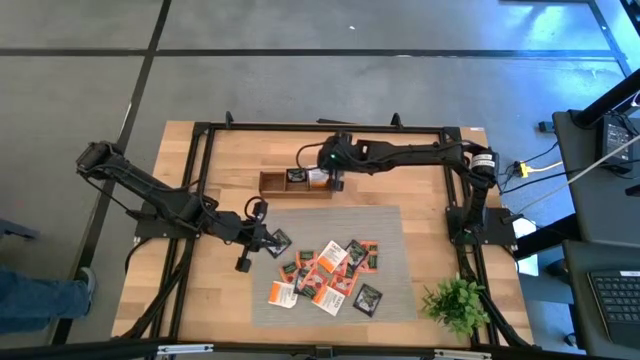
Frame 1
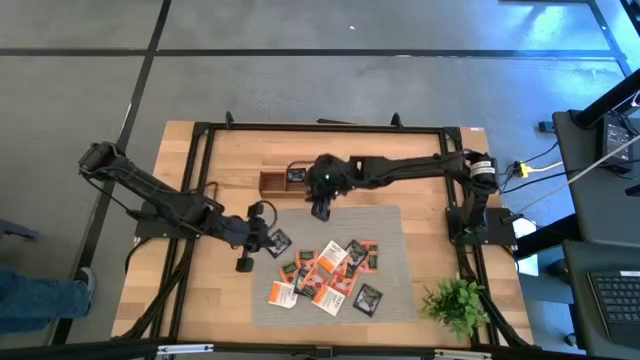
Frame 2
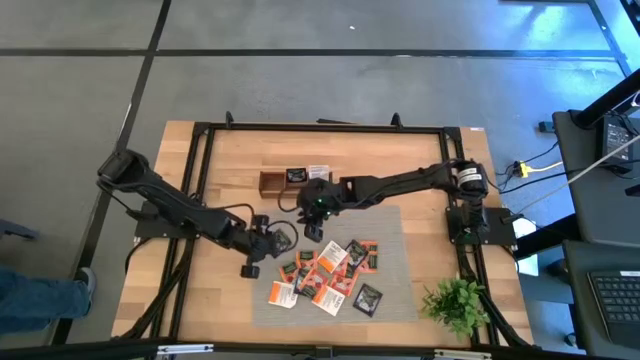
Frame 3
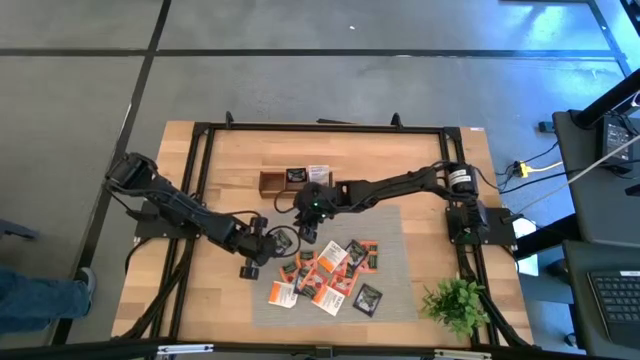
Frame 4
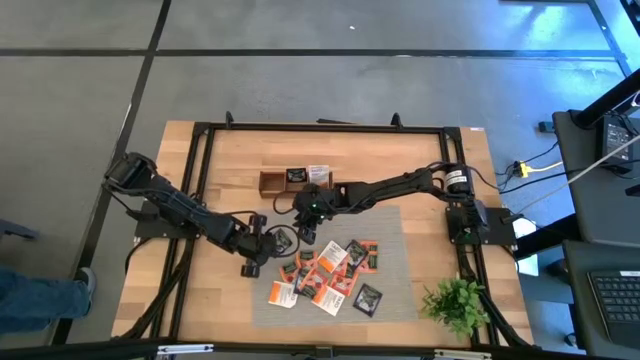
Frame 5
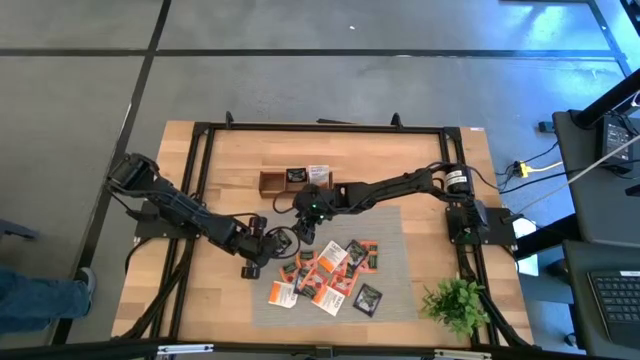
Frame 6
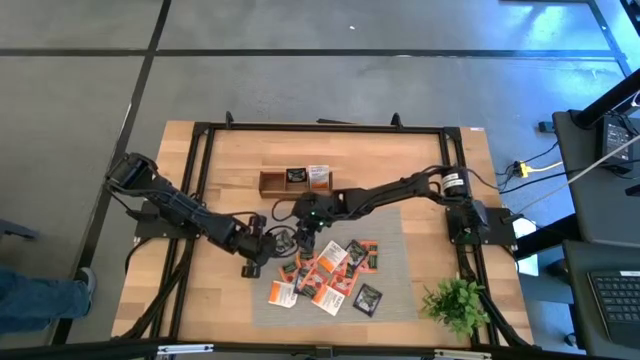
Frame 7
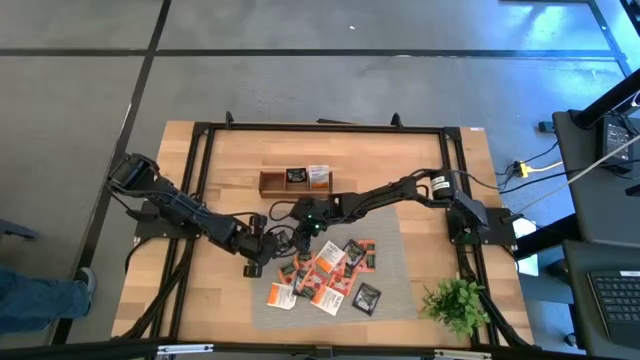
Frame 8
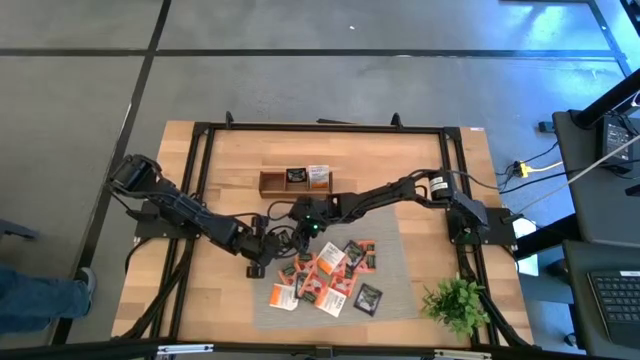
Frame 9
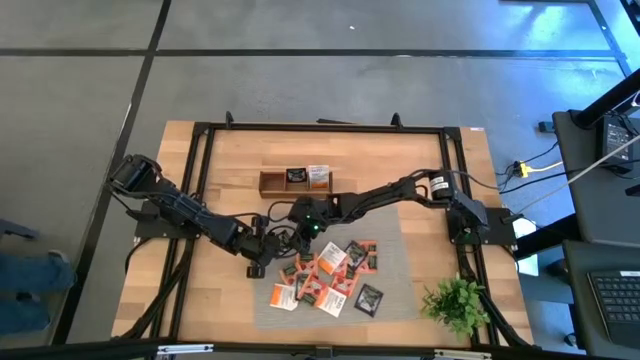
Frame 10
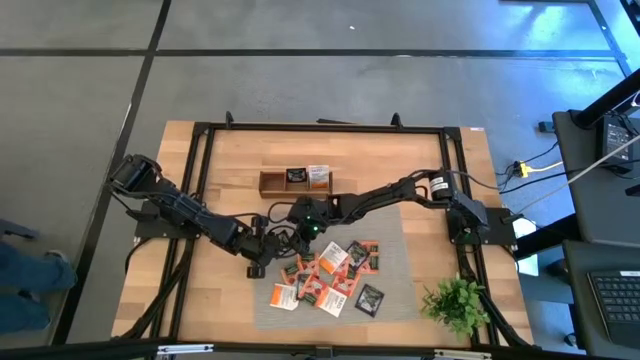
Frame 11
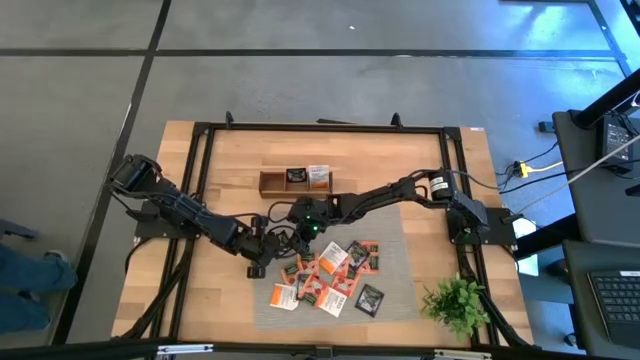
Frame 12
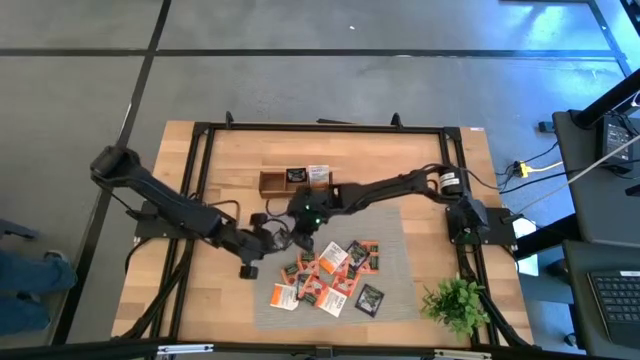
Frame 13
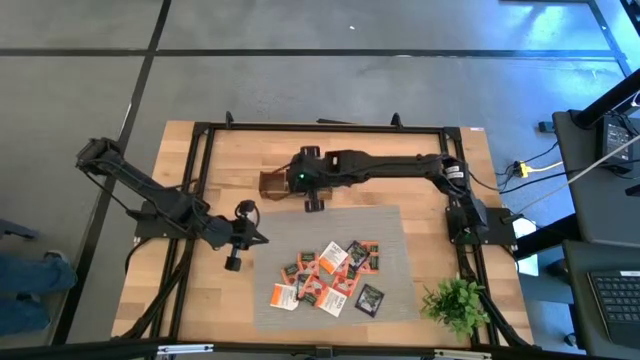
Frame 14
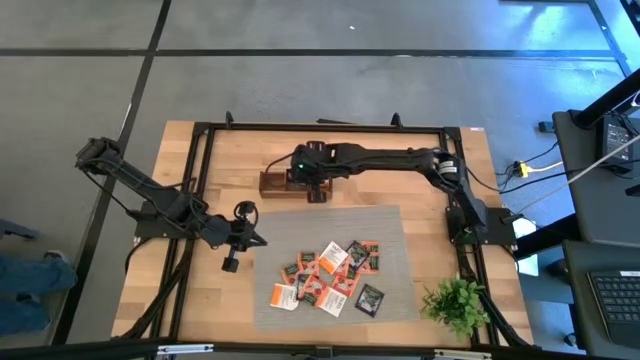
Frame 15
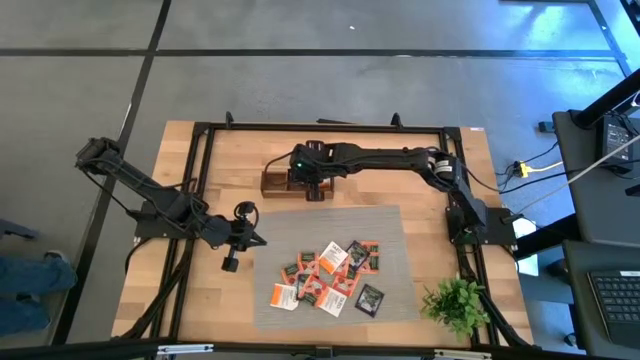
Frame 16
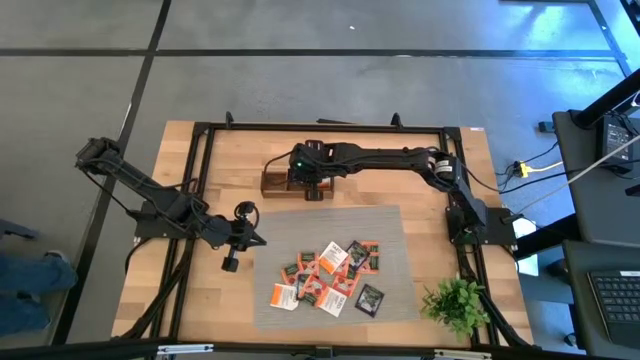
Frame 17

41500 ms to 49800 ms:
Task: Pick & Place Tea
Put the purple tea bag into the middle section of the wooden organizer

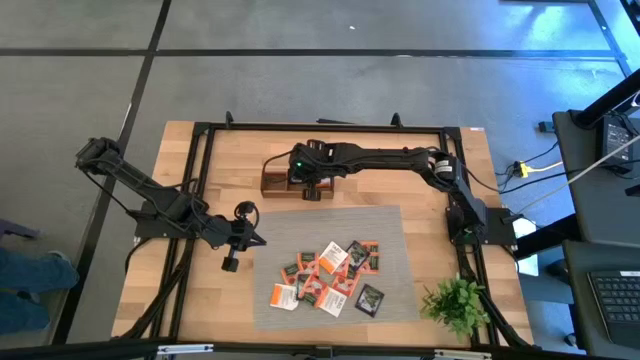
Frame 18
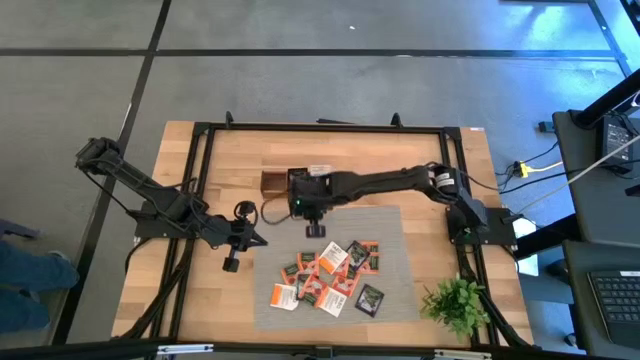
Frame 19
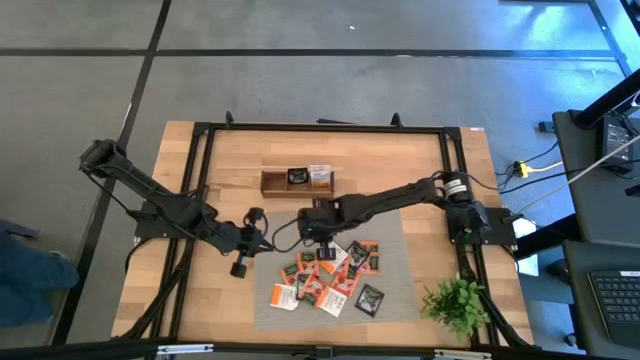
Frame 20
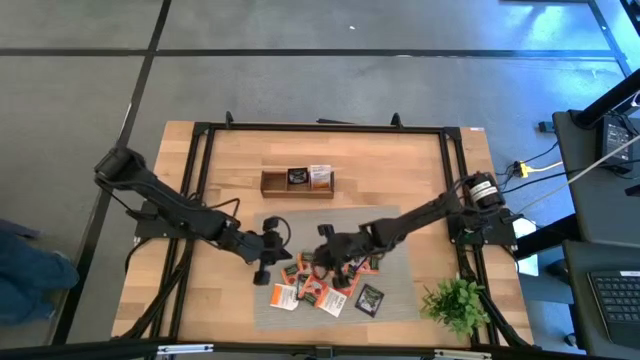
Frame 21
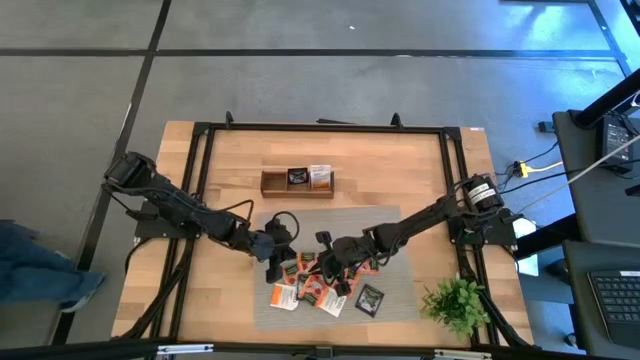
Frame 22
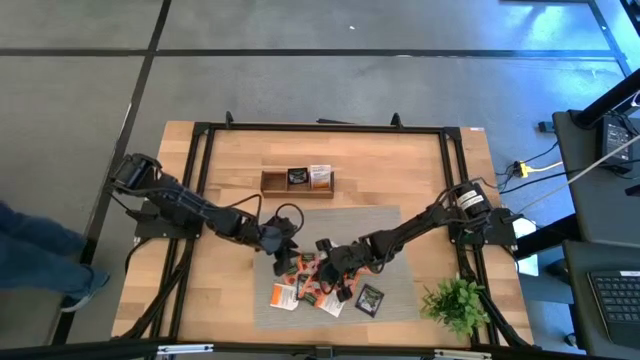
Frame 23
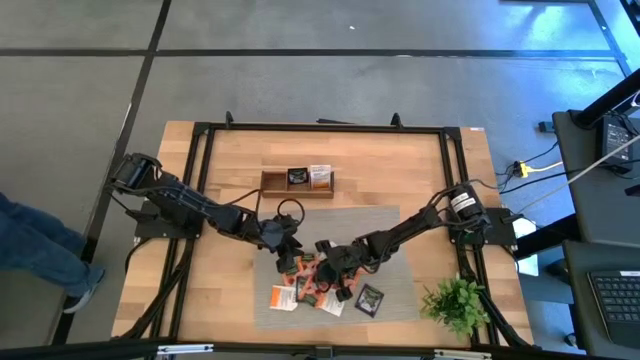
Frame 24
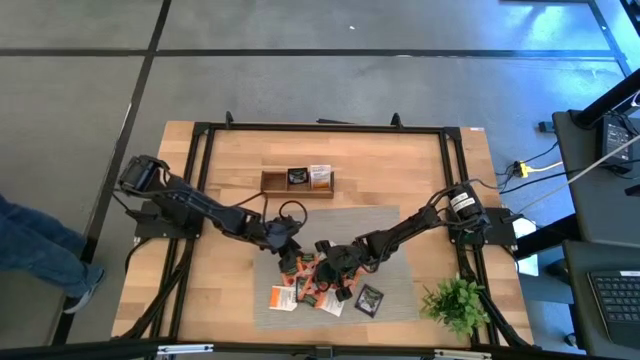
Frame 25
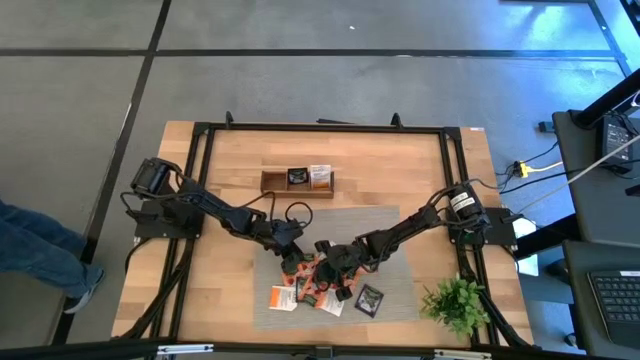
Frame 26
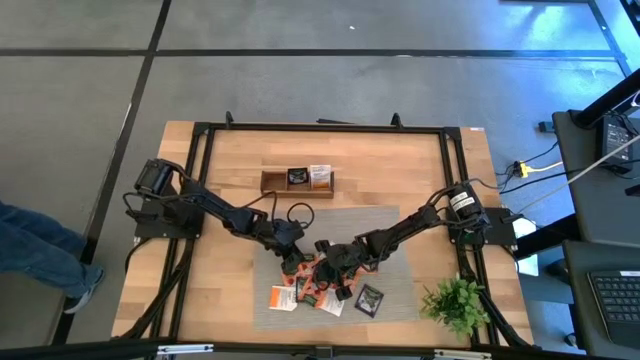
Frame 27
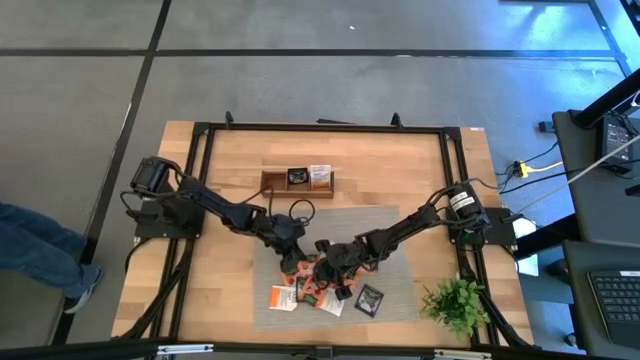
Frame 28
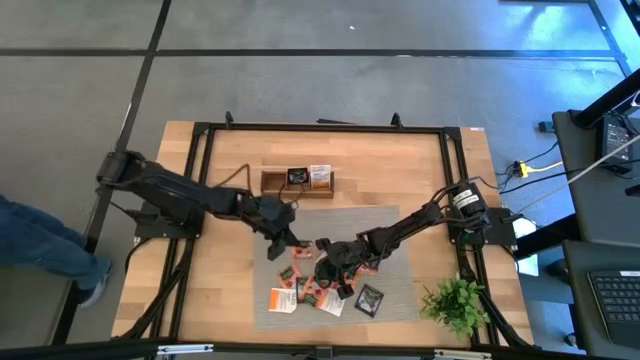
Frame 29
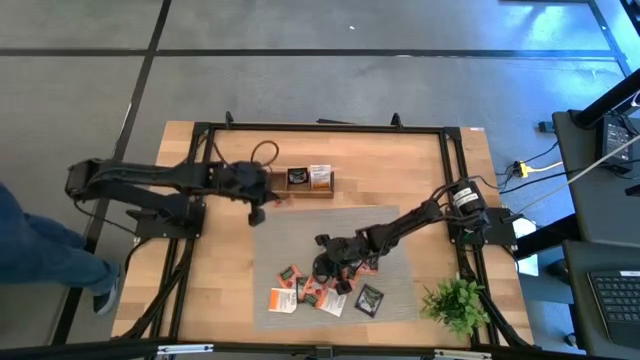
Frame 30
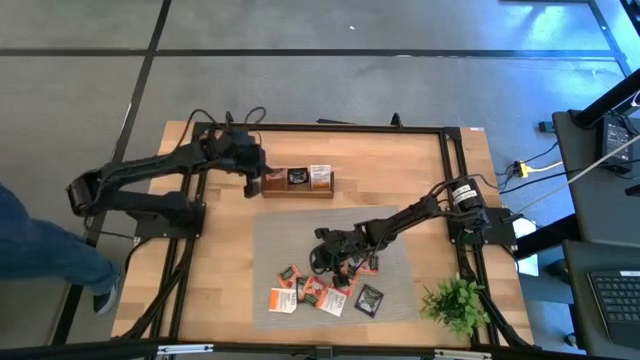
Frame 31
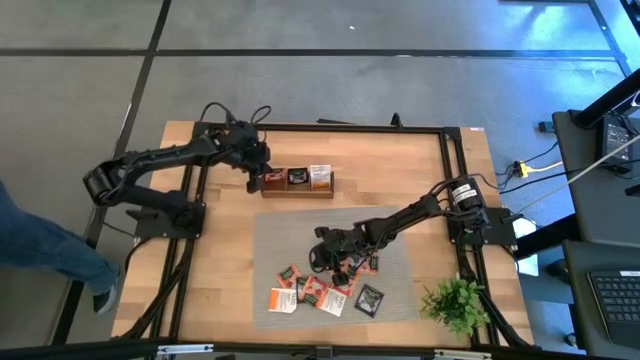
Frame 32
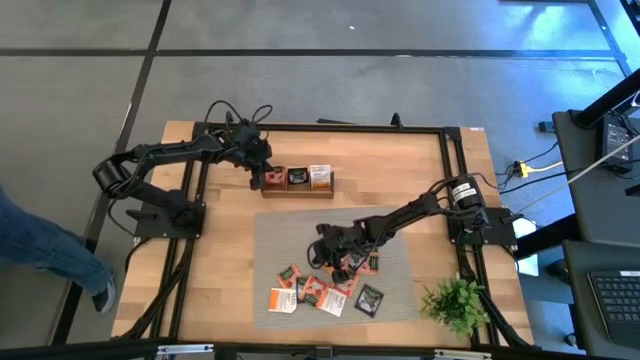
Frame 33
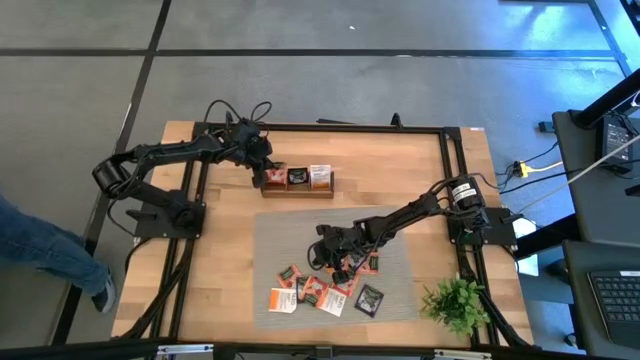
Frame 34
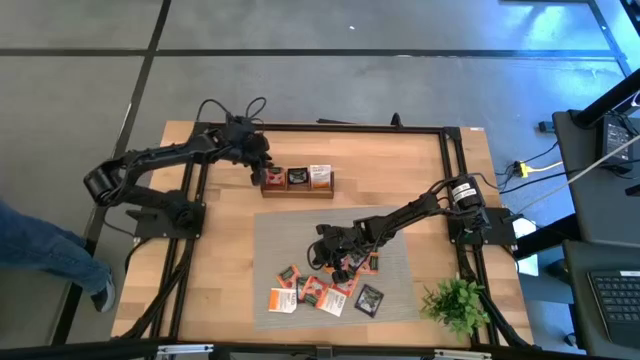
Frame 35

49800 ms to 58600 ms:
Put the orange tea bag into the left section of the wooden organizer

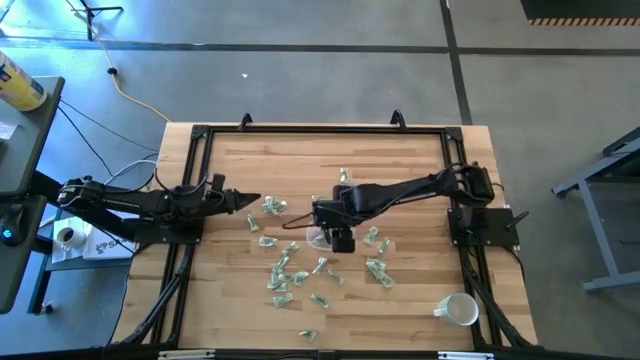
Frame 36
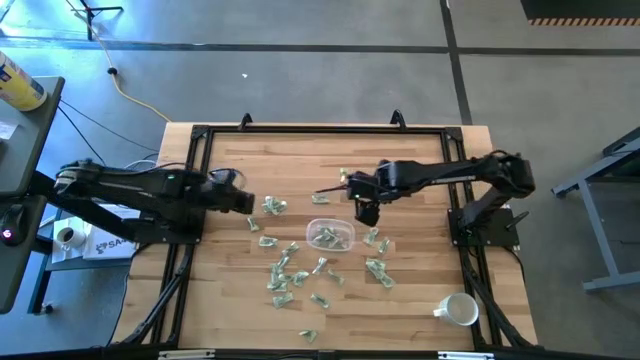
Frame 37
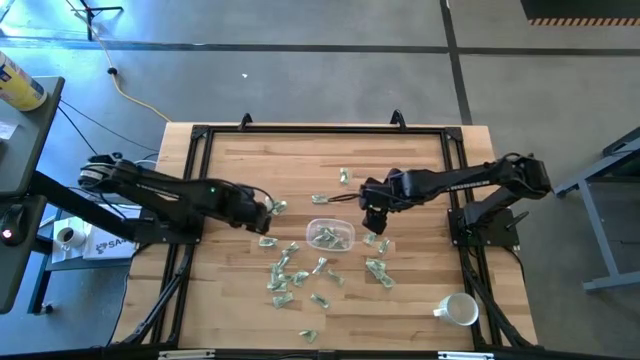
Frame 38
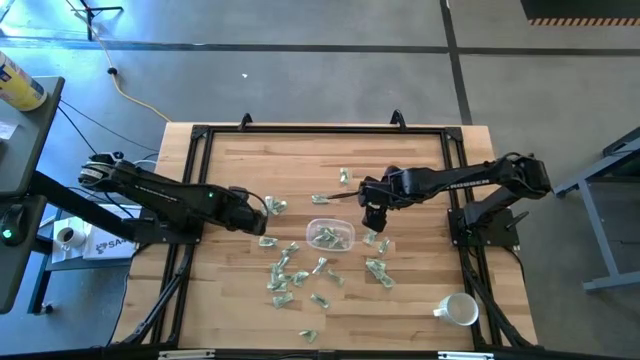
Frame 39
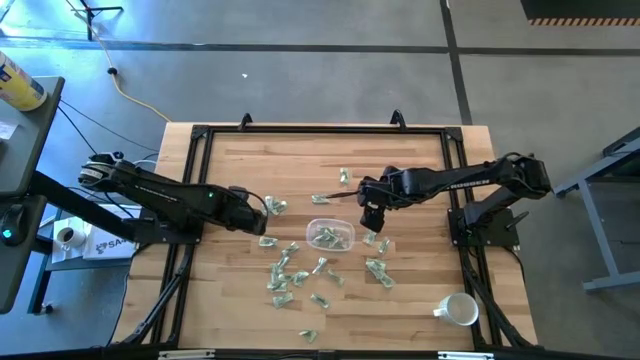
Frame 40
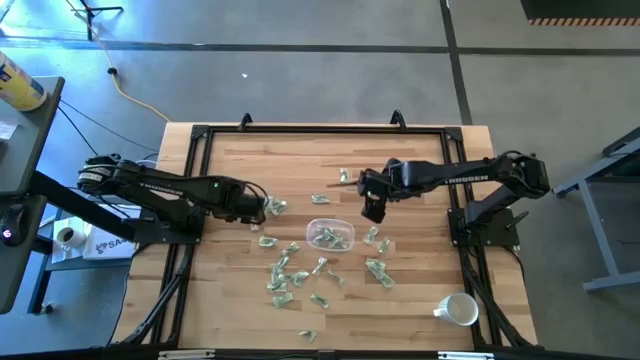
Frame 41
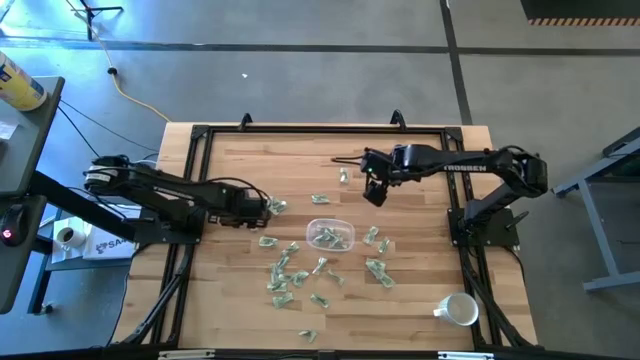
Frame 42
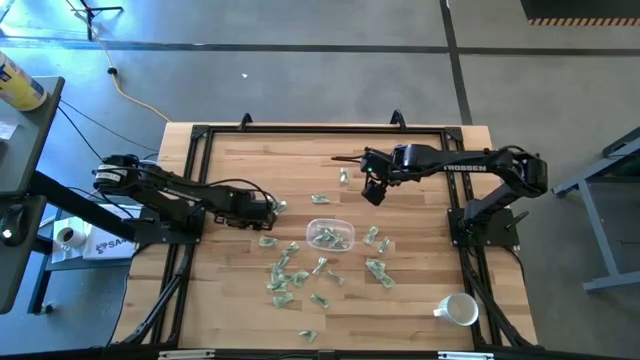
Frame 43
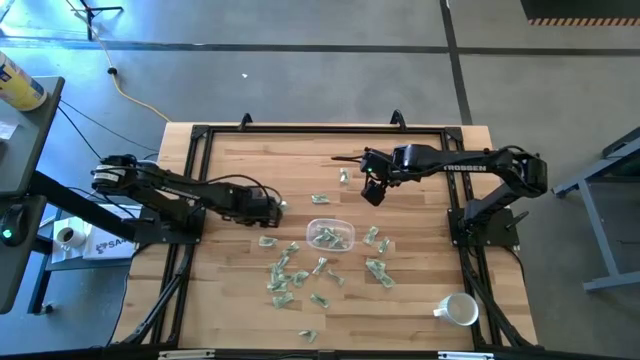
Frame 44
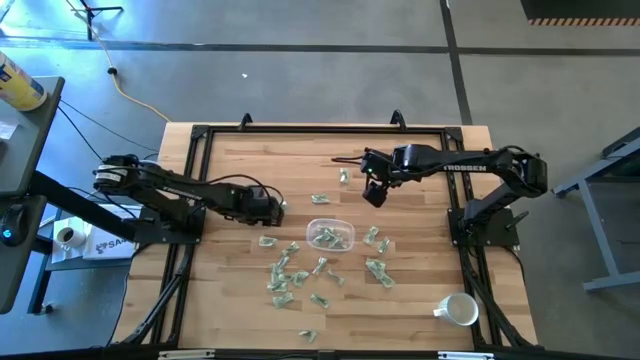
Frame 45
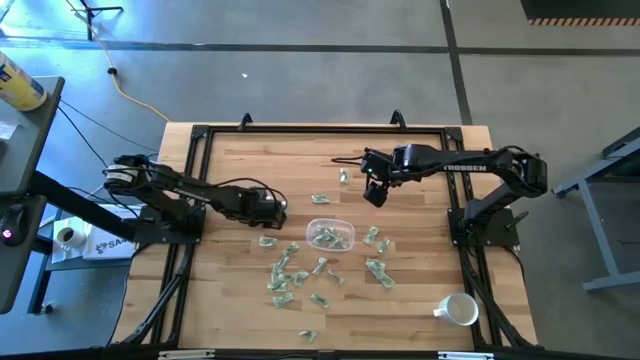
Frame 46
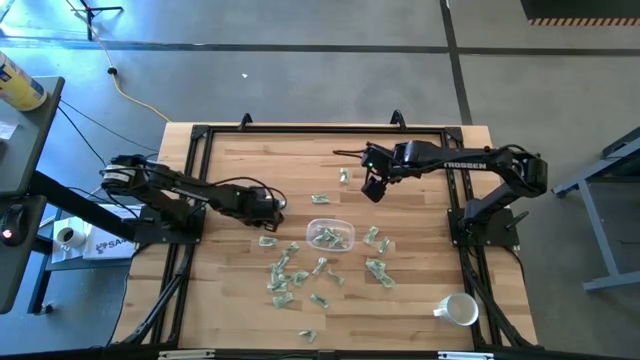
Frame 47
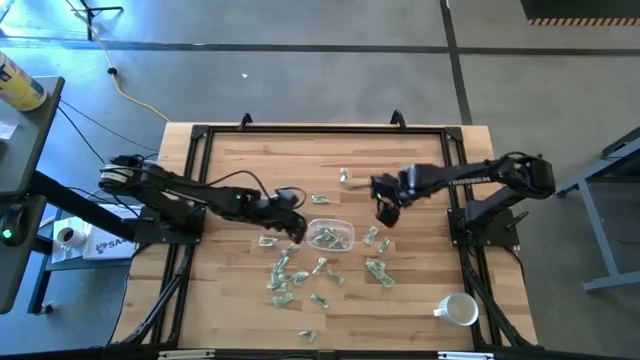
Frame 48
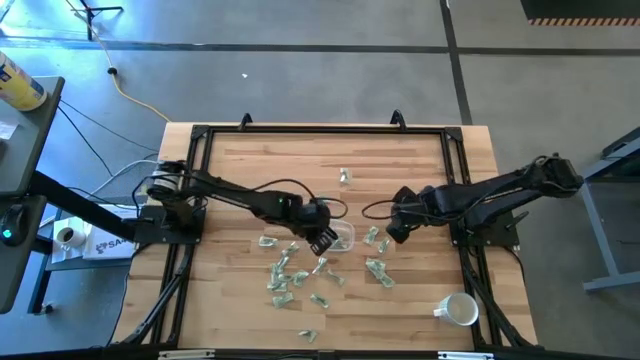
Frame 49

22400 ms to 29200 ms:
Task: Pick and place Stevia / Truvia into bins
Put the green stevia packet into the transparent container
